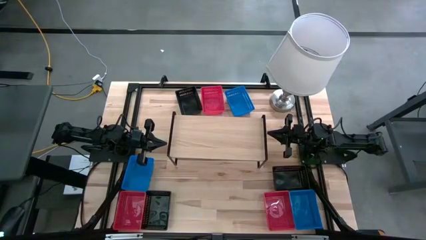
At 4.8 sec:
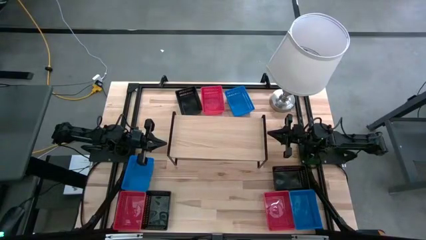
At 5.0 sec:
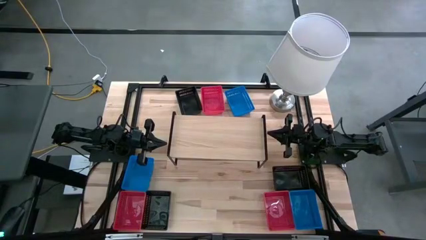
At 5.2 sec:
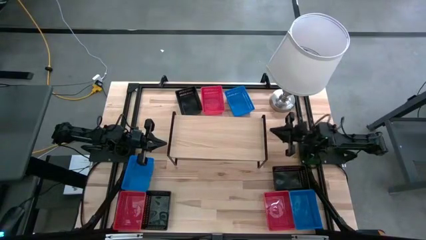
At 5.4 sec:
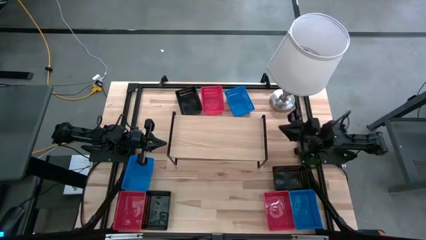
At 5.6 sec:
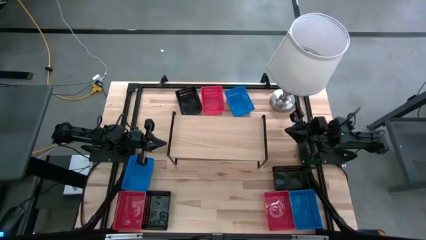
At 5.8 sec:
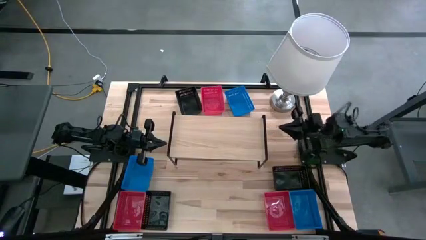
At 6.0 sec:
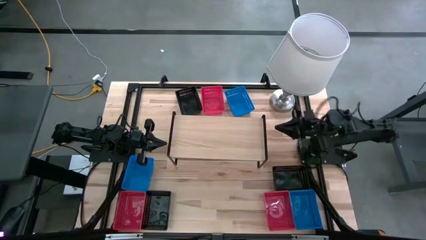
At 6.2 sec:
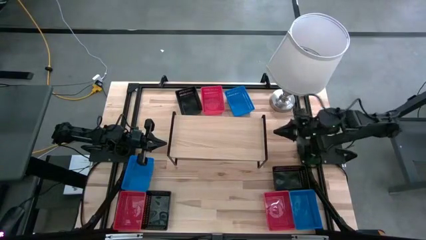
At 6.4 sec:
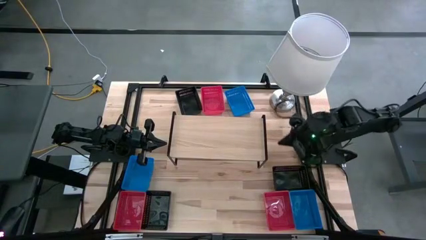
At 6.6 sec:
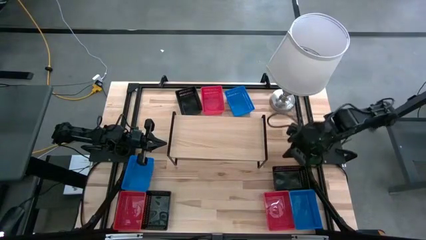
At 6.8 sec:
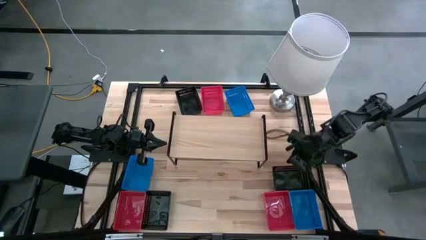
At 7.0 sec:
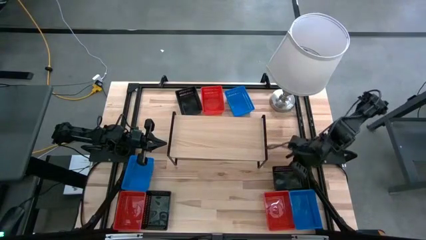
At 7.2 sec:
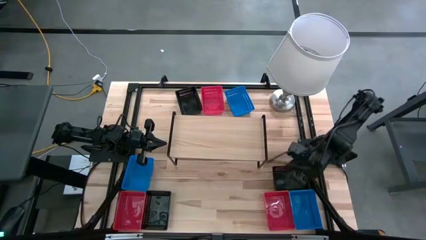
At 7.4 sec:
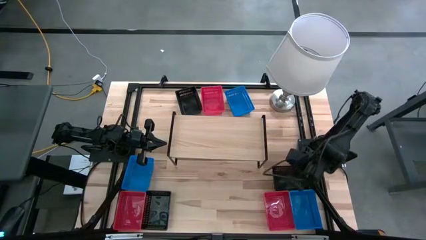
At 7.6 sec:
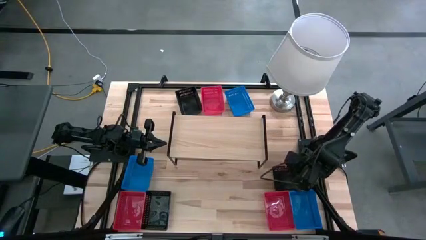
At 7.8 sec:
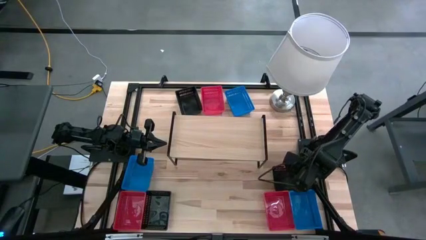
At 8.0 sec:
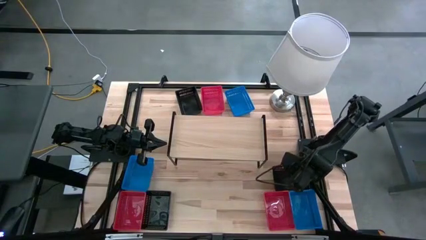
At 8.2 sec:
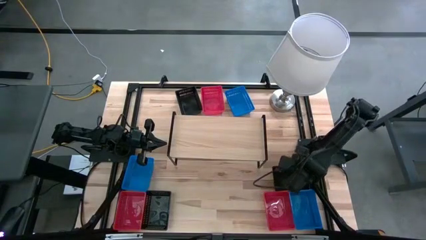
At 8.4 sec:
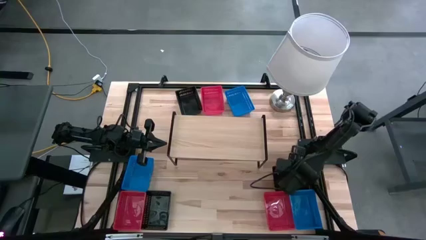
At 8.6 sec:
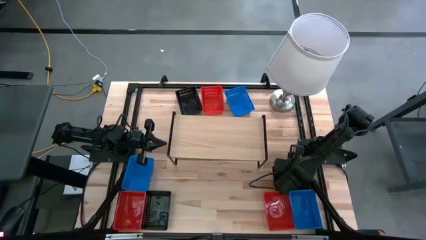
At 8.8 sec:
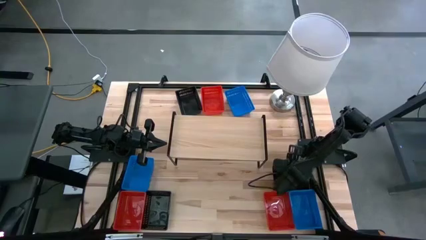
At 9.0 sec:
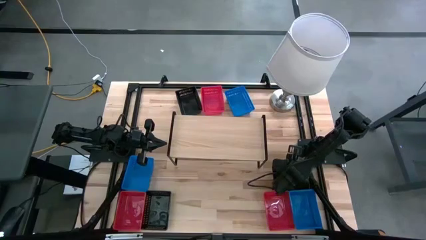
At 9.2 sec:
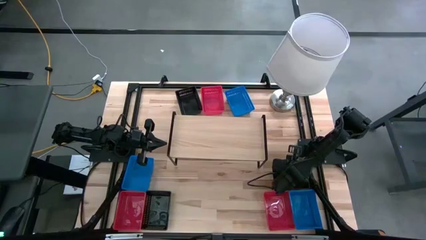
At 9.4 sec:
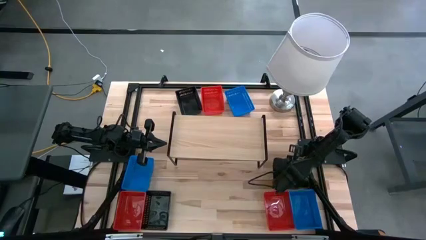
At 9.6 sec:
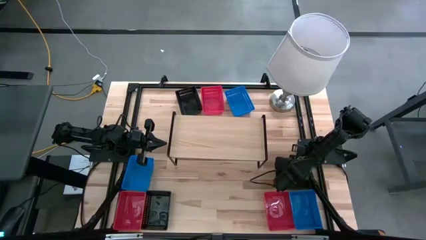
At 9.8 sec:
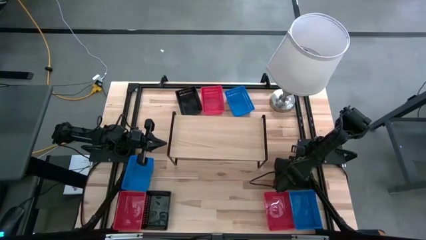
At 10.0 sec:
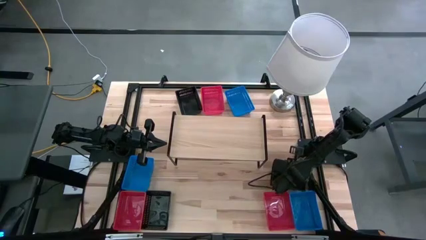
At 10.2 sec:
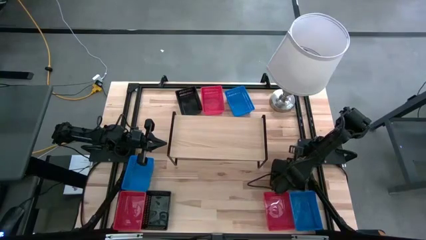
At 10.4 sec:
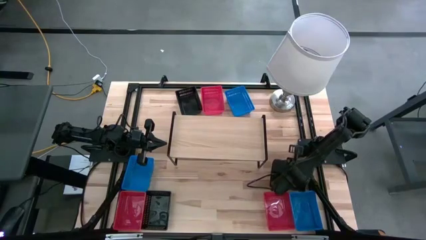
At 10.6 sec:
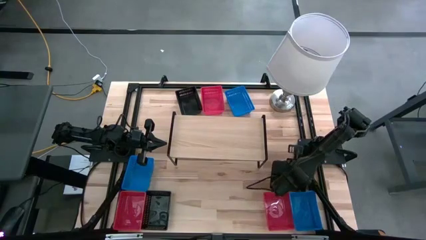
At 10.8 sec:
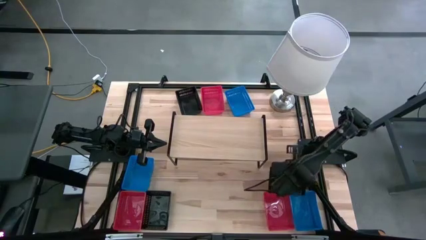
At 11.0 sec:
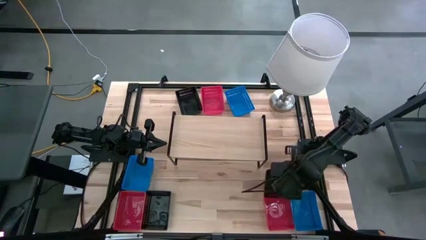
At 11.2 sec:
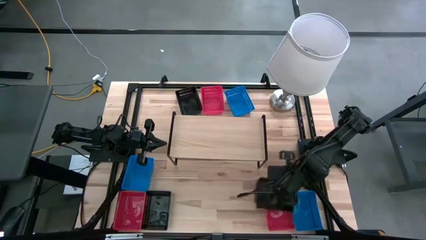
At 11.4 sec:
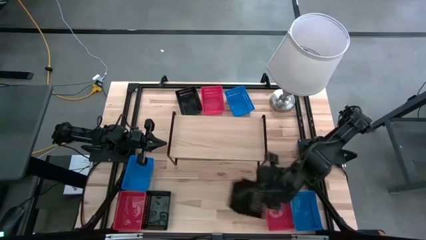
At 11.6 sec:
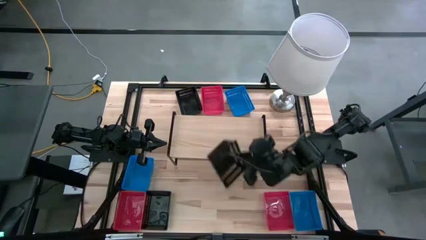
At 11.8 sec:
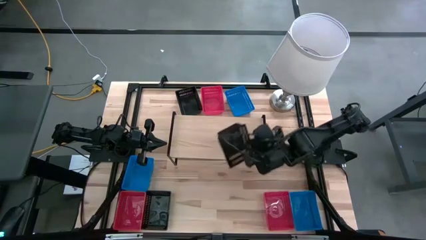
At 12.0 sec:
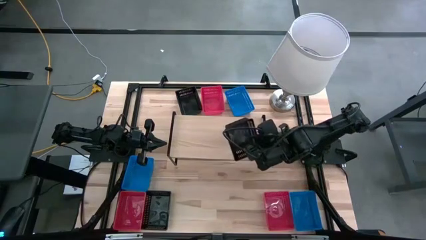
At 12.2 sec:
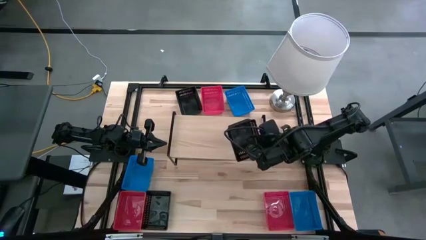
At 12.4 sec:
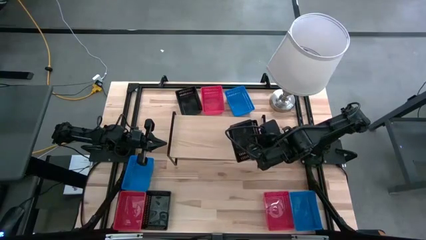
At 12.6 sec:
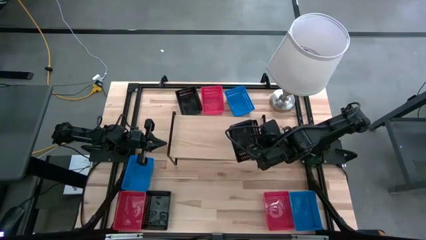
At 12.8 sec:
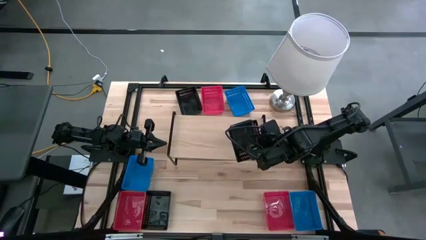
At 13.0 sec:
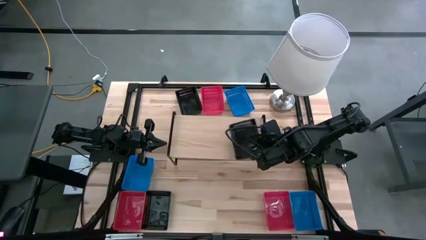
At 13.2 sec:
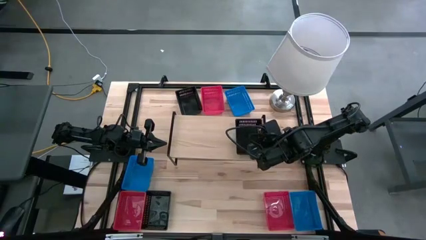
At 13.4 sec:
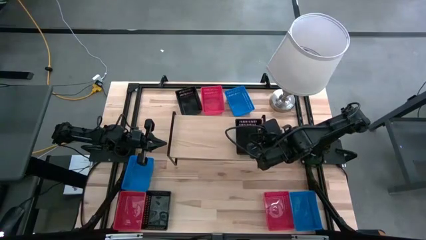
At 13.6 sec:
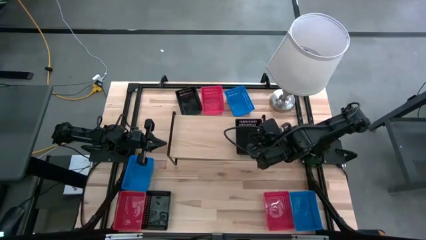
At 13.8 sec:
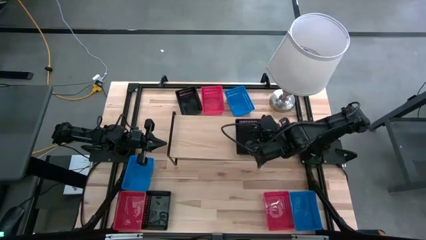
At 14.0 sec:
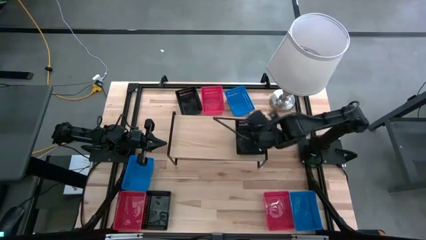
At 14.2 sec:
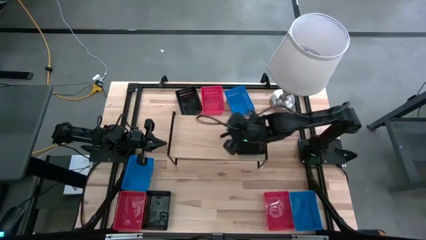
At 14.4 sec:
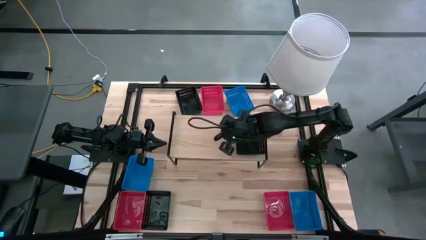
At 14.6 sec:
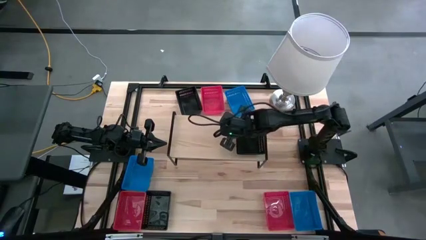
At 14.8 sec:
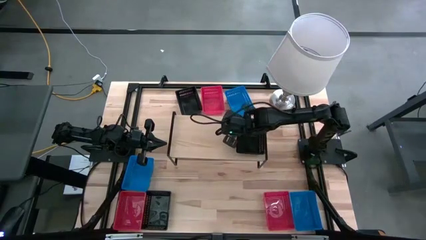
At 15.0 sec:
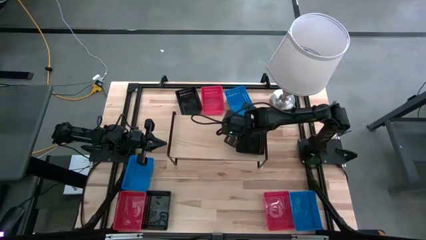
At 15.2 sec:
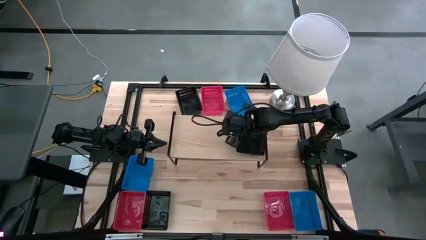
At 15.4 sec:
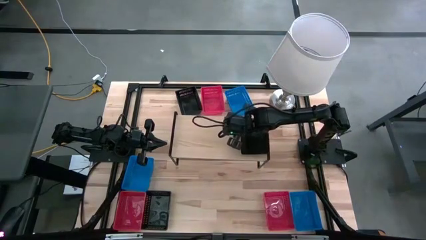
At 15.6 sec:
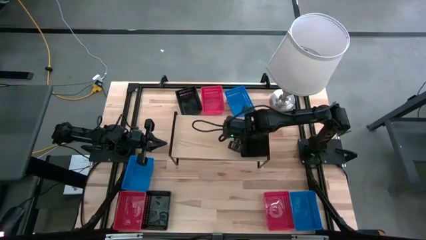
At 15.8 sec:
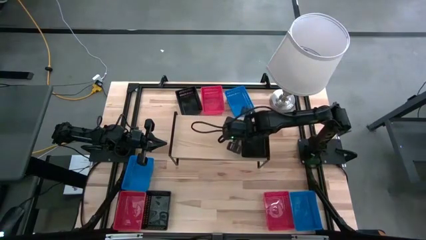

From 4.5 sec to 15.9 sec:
Task: Stack baskets on shelf by color
Put the middle right black bin on the shelf
